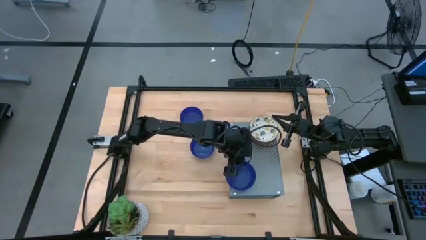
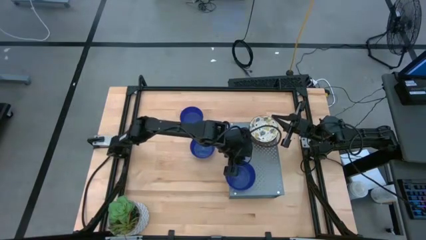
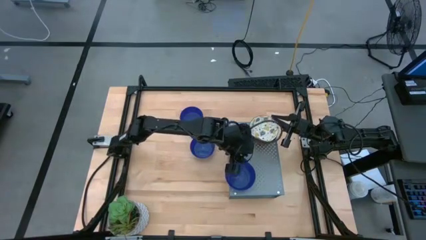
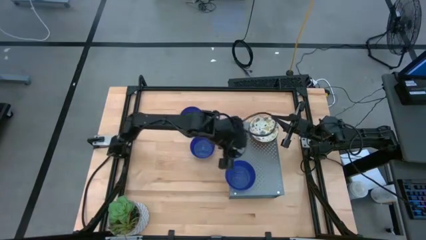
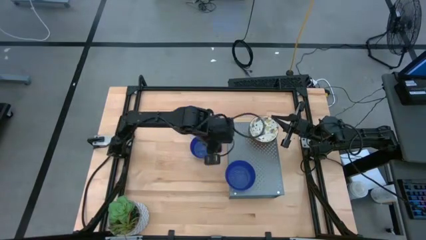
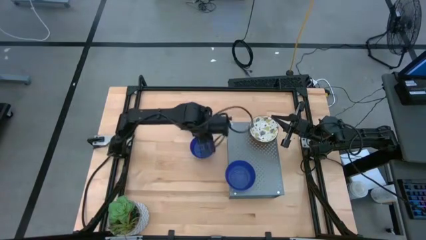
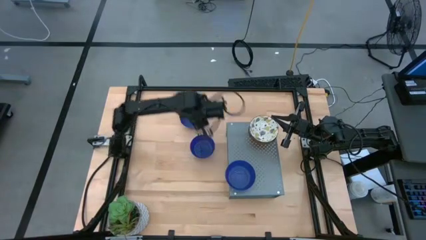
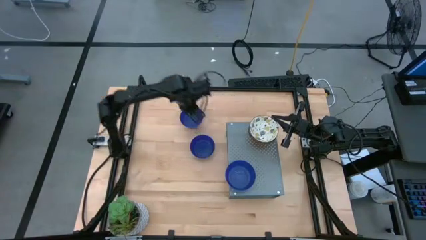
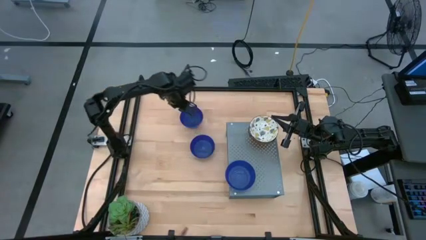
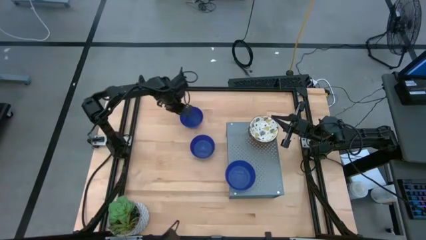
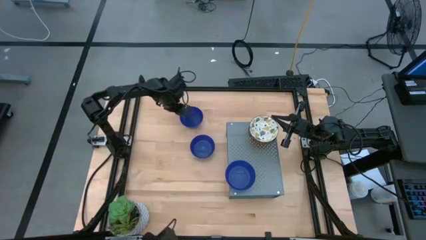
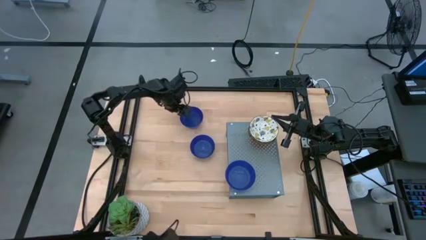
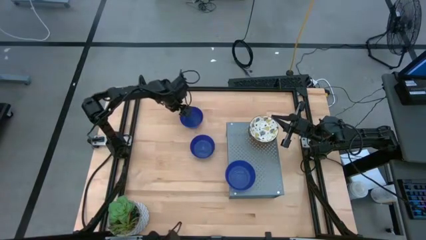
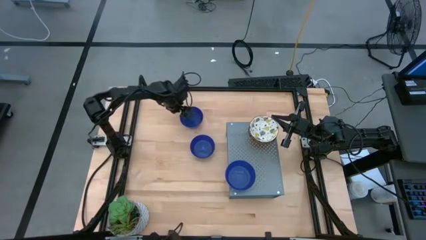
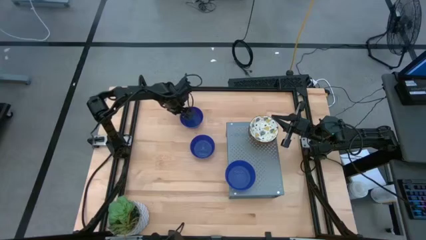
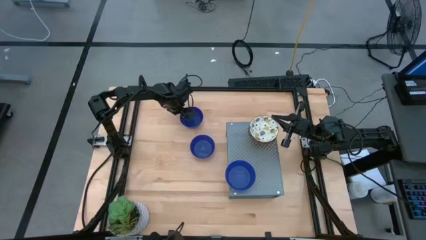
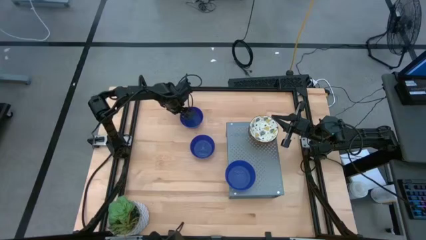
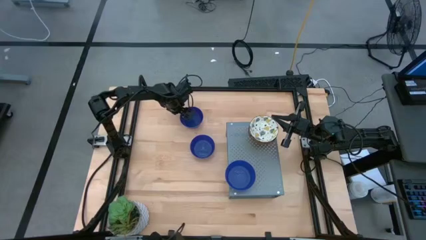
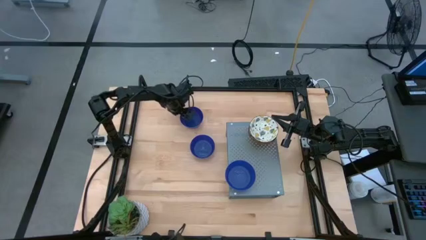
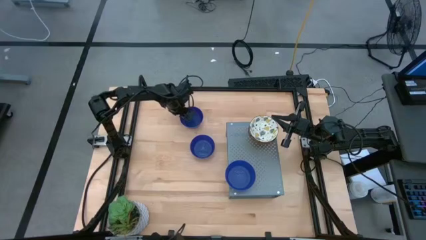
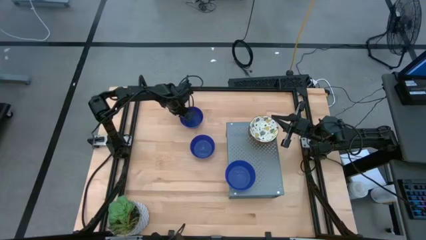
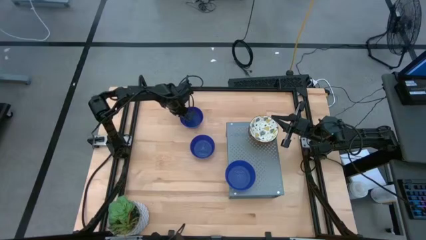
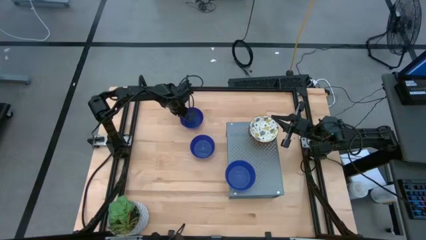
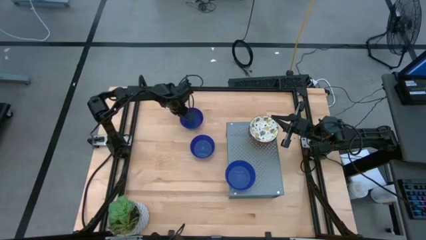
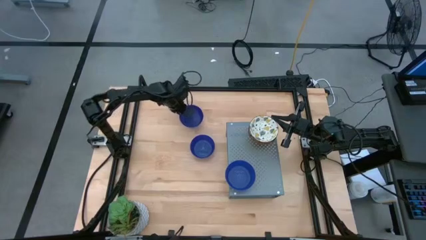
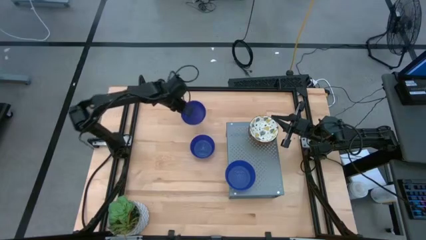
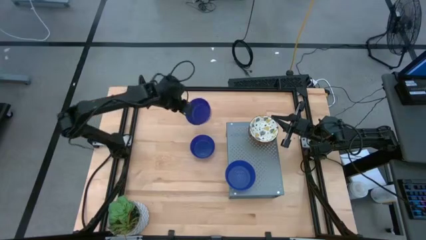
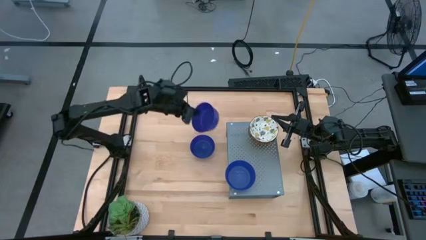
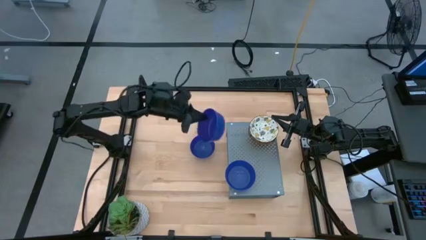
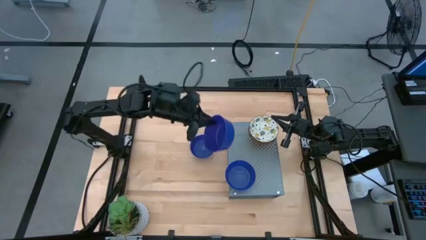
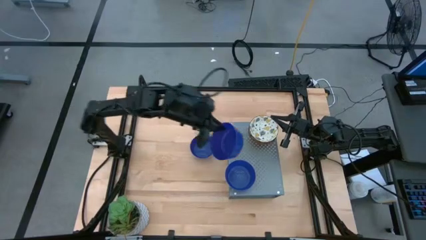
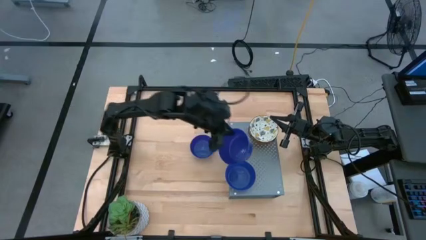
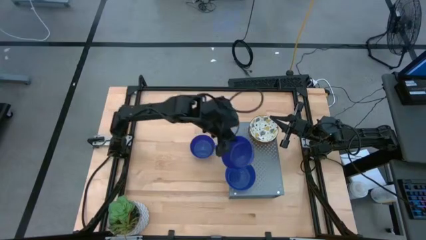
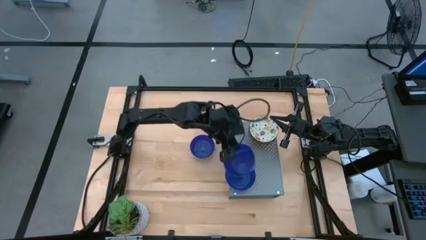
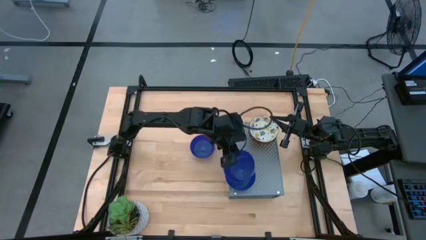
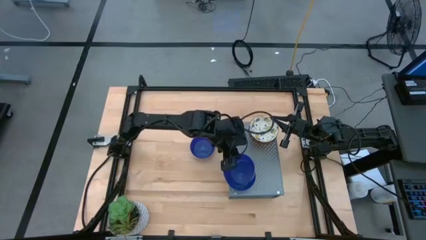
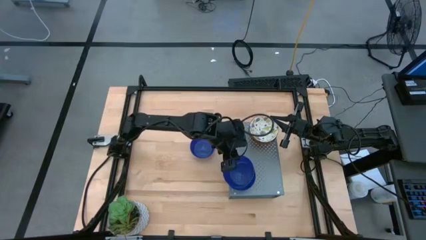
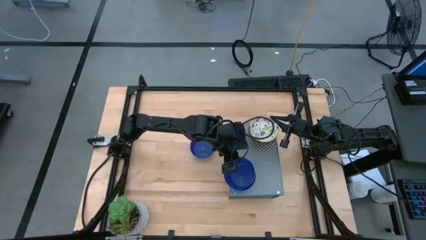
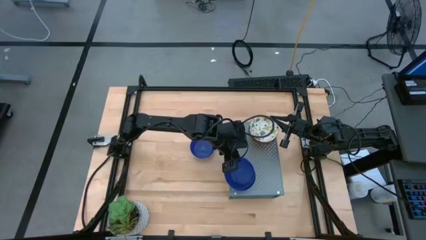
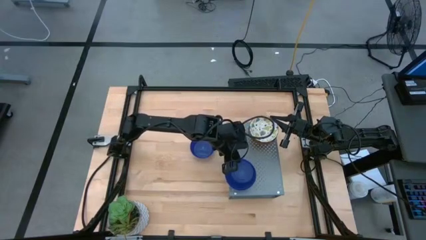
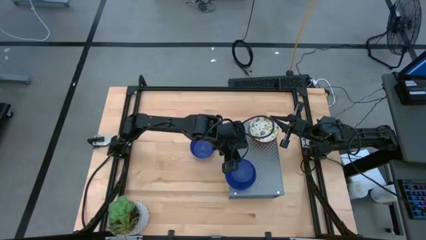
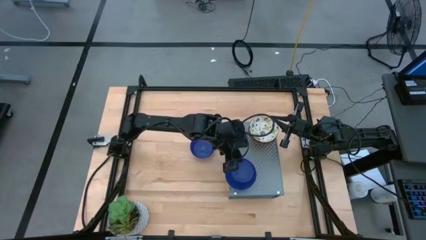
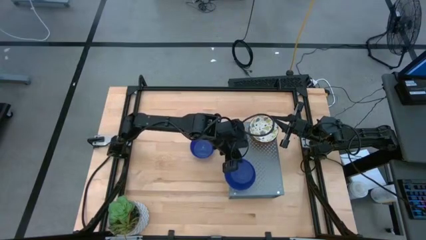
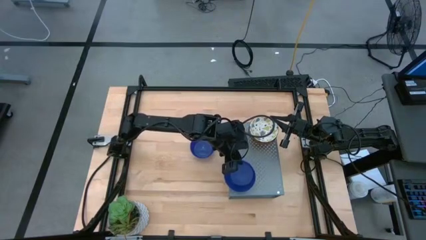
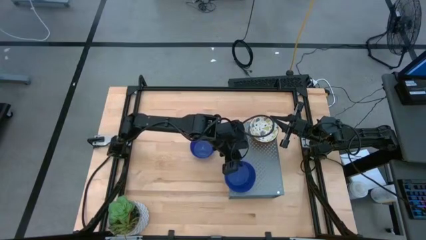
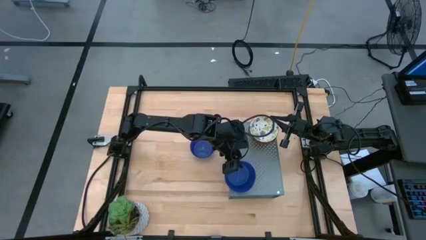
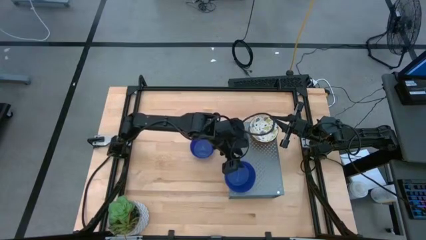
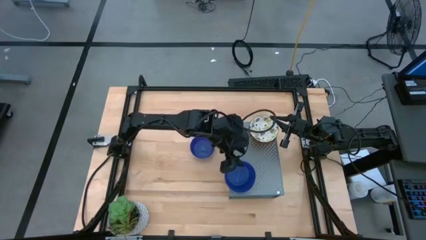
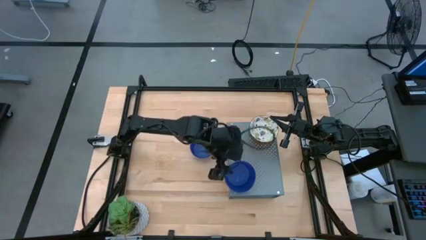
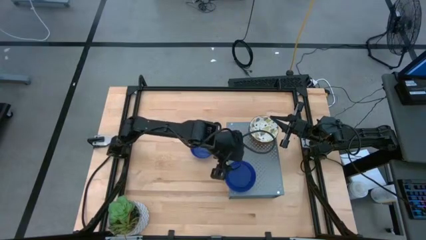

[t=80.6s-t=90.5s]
Task: Pick & Place Mini bowls
Stack the top blue bowl on the blue bowl on the shelf

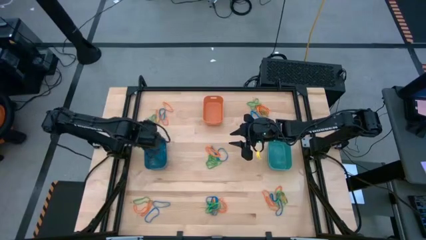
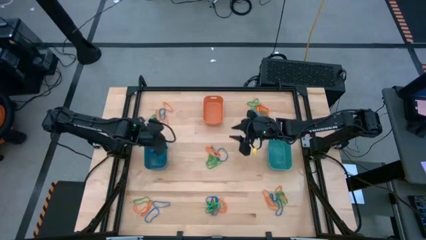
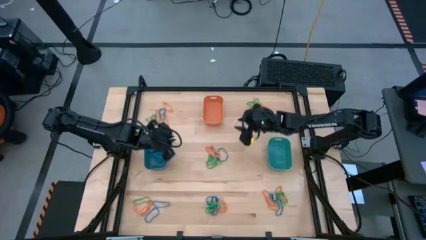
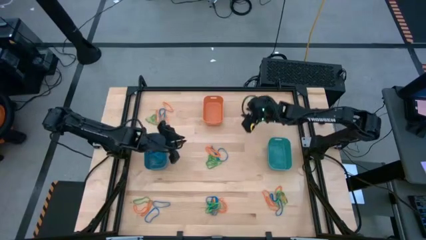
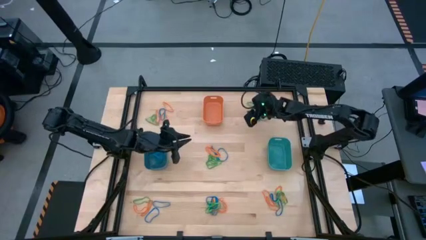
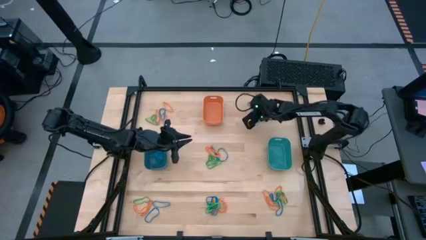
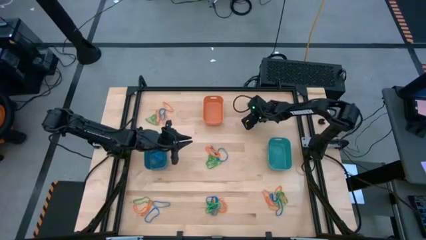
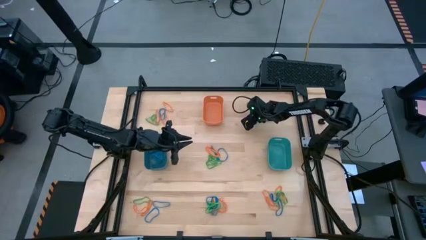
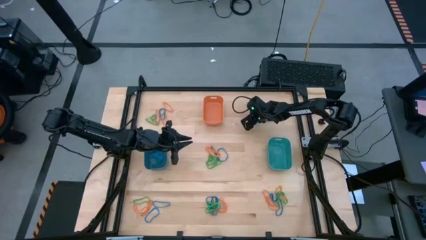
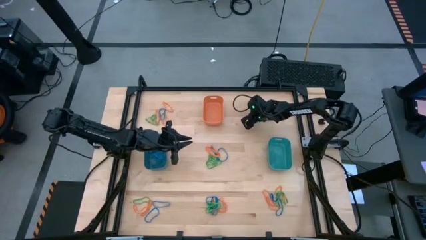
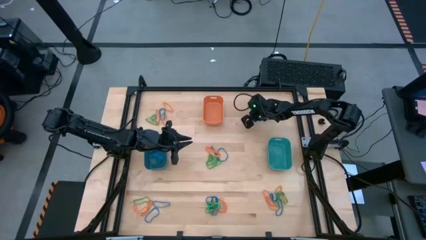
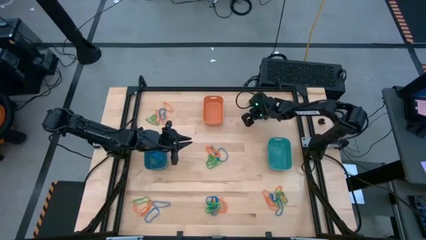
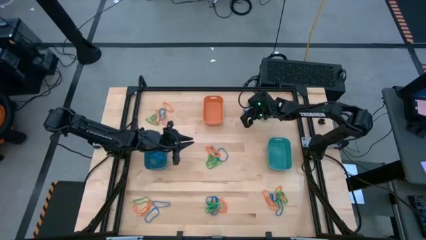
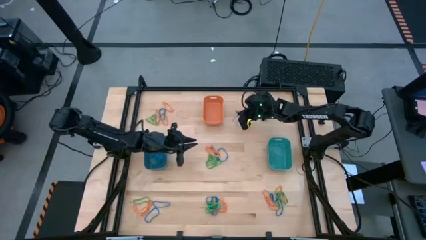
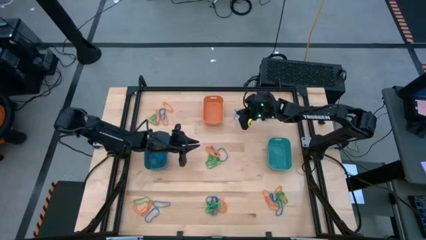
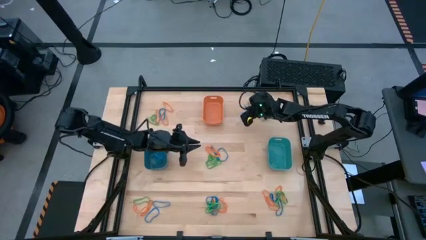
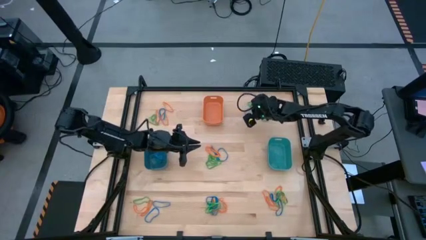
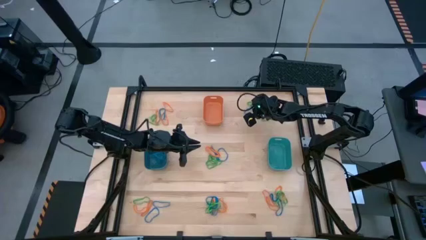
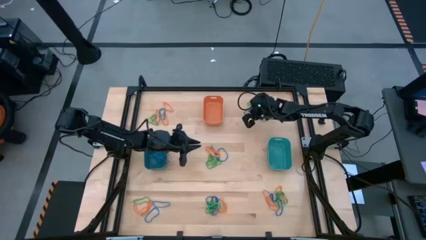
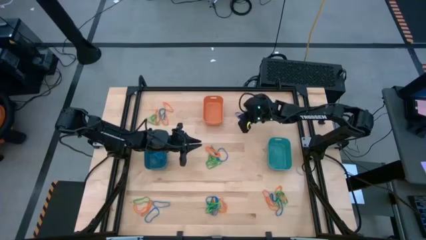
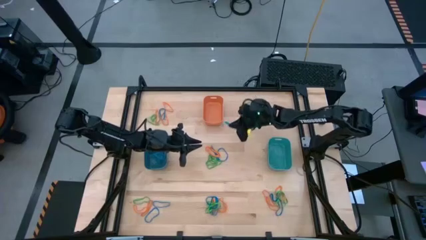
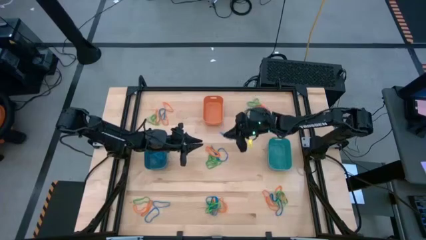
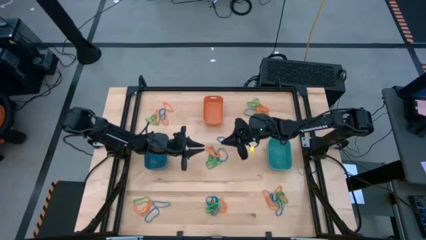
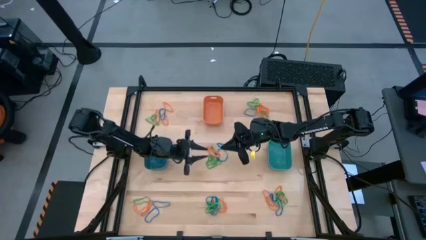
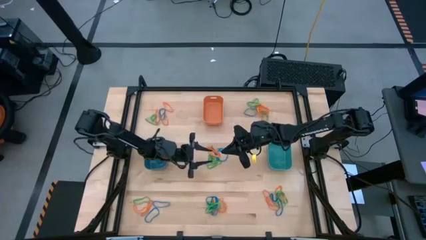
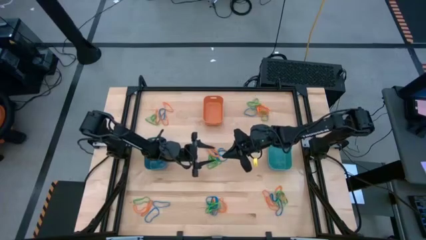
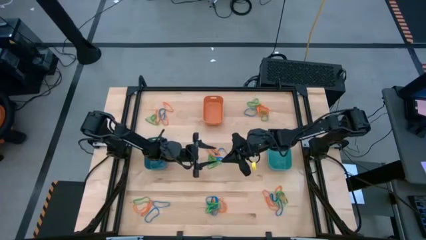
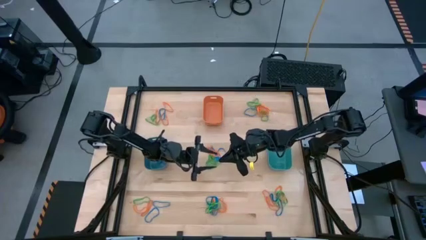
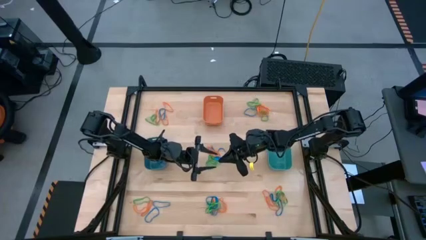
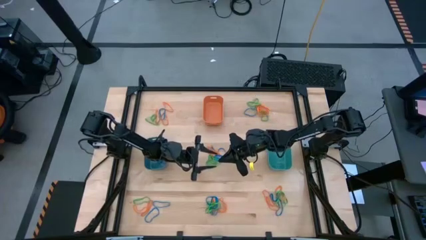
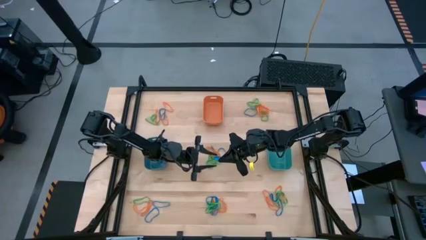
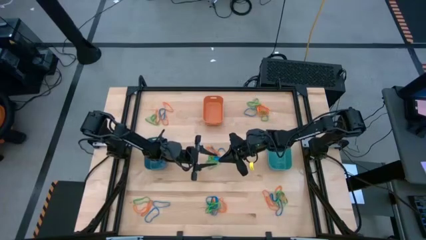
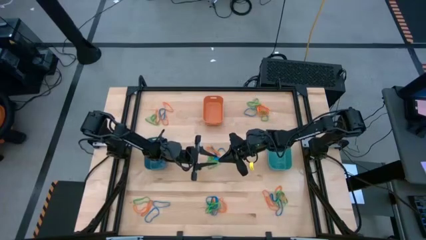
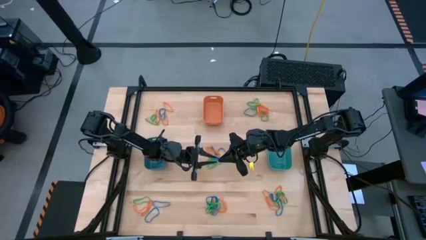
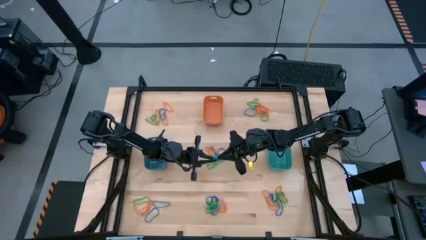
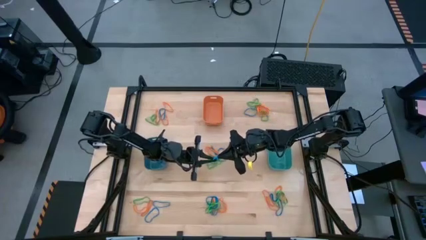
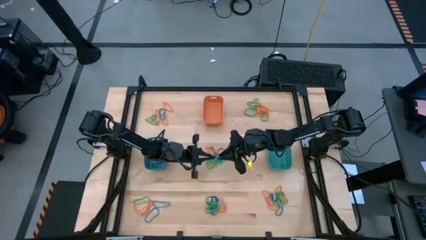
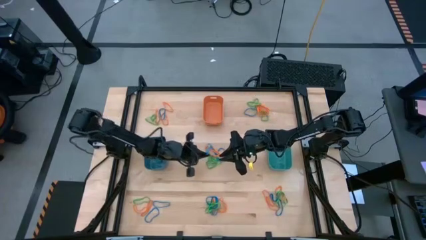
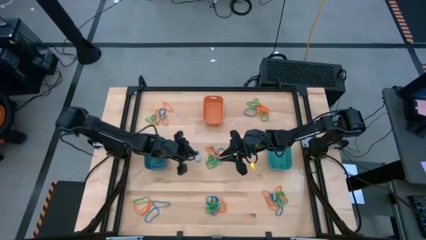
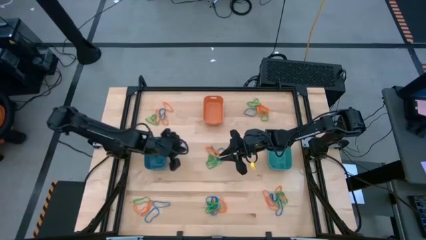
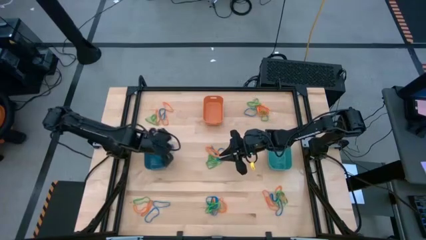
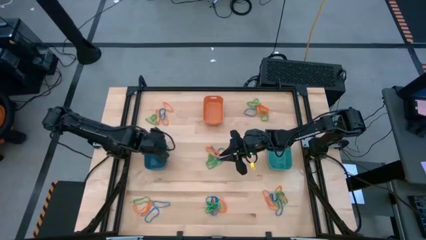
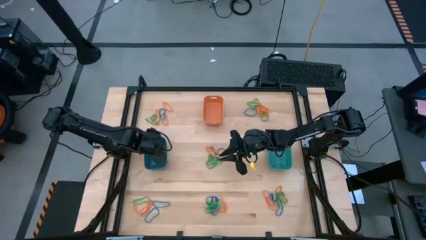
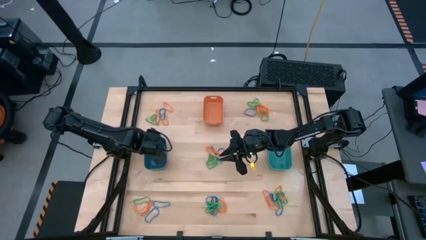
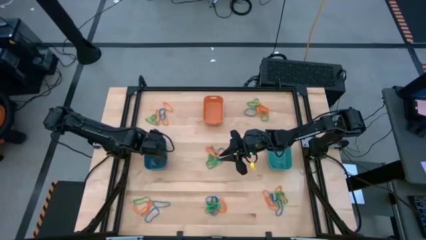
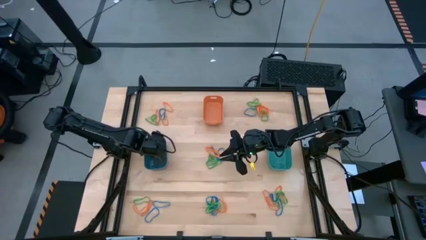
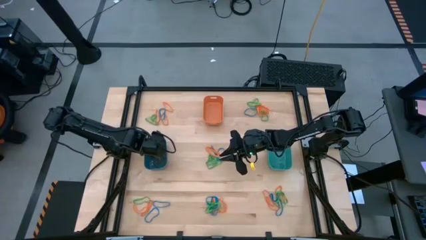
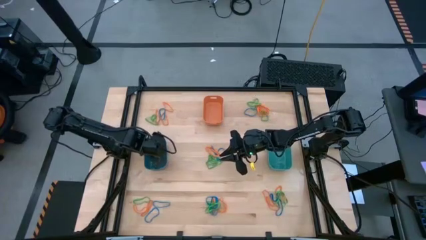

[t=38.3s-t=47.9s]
Task: Sort rubber bands into baskets
Put the blue rubber band into the blue bin
